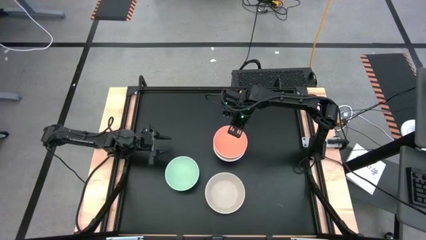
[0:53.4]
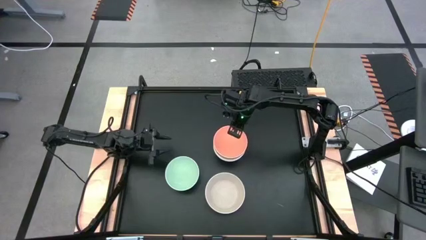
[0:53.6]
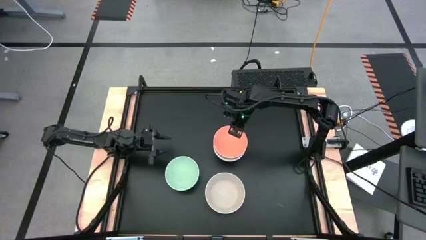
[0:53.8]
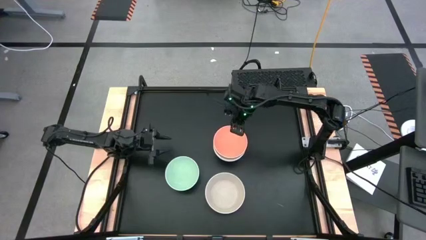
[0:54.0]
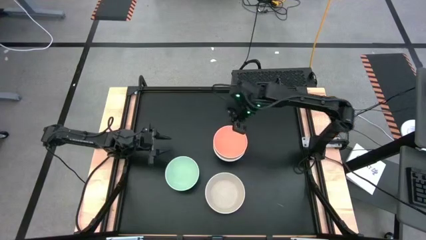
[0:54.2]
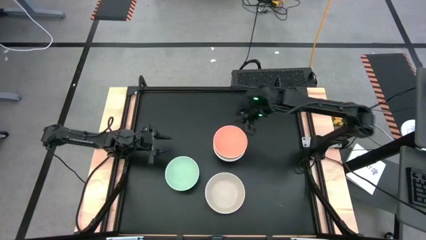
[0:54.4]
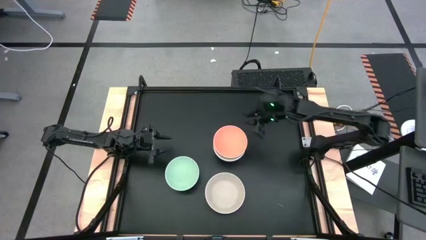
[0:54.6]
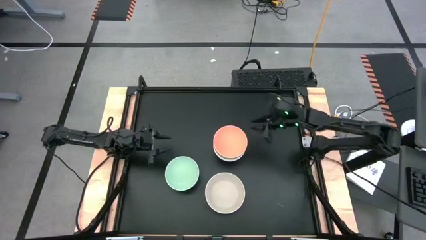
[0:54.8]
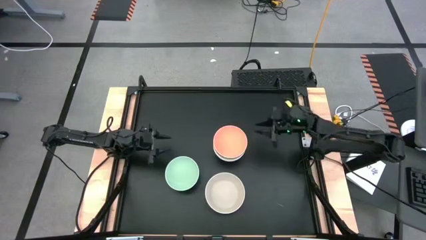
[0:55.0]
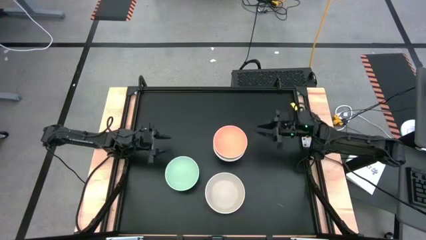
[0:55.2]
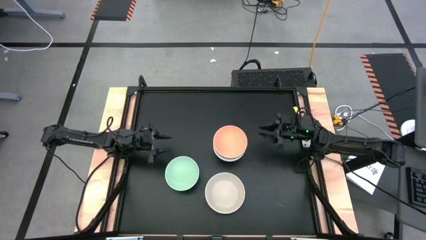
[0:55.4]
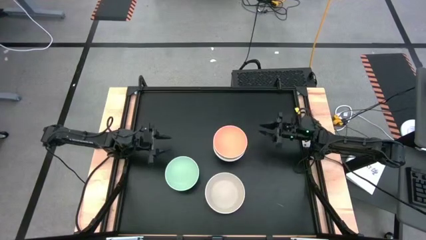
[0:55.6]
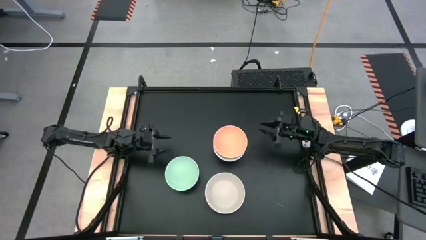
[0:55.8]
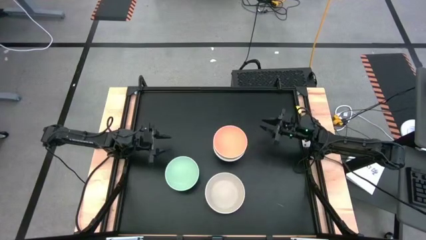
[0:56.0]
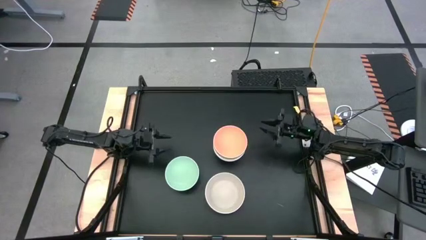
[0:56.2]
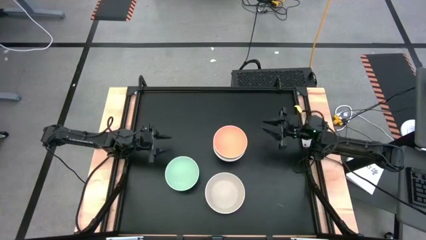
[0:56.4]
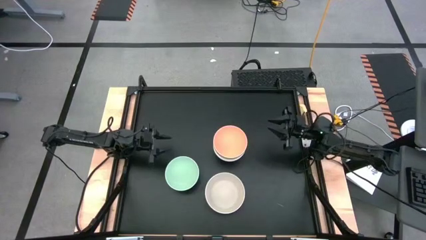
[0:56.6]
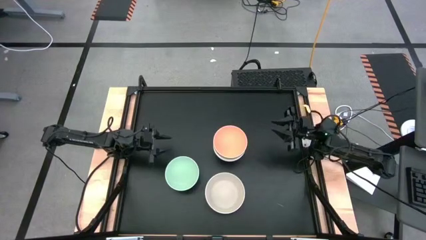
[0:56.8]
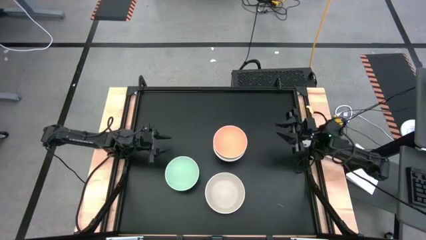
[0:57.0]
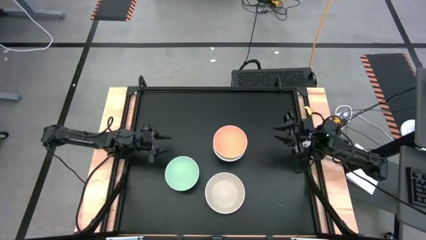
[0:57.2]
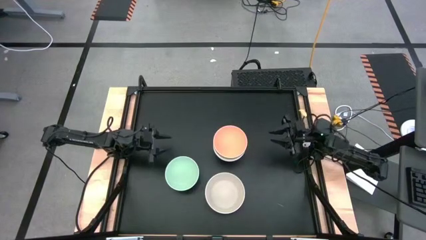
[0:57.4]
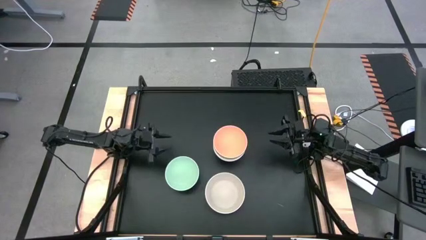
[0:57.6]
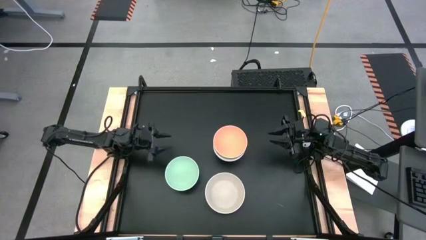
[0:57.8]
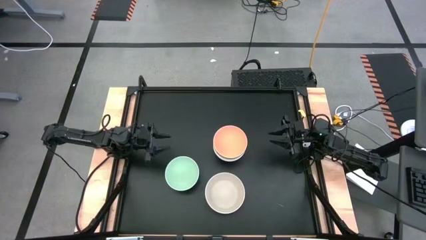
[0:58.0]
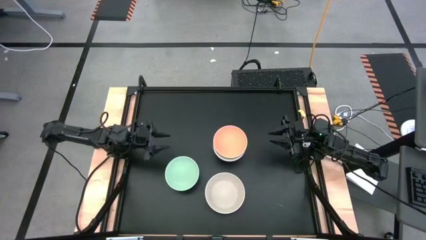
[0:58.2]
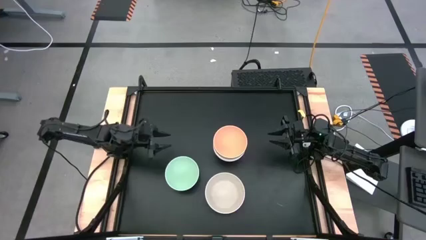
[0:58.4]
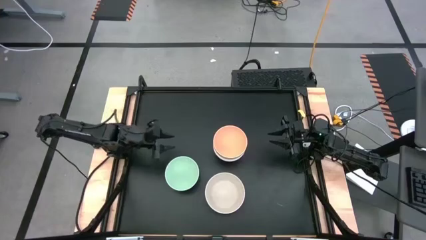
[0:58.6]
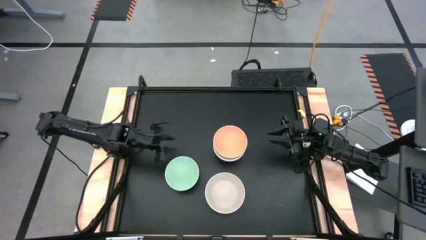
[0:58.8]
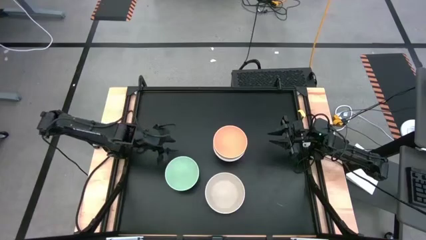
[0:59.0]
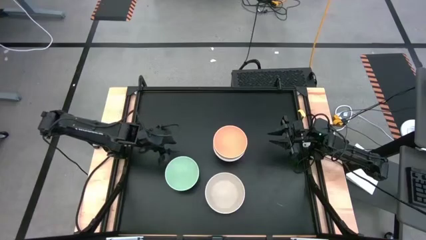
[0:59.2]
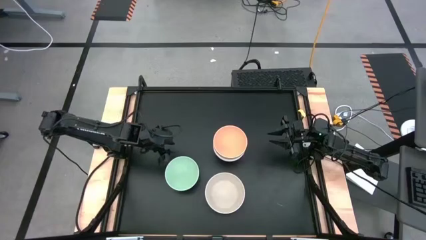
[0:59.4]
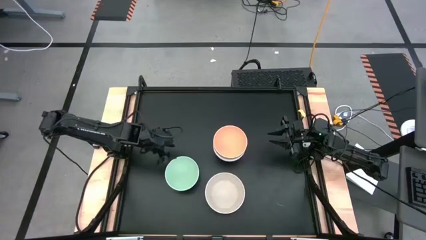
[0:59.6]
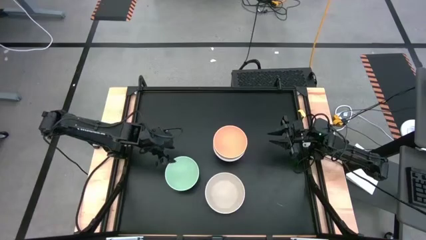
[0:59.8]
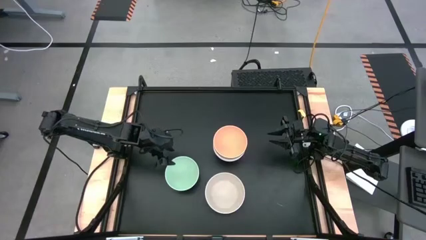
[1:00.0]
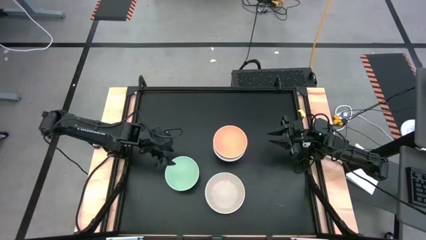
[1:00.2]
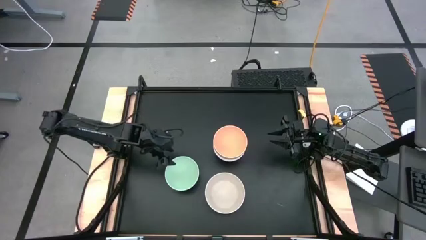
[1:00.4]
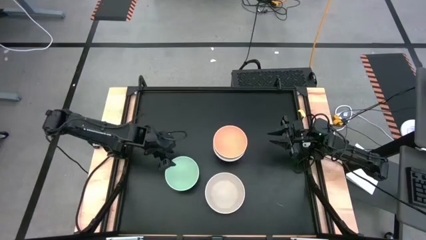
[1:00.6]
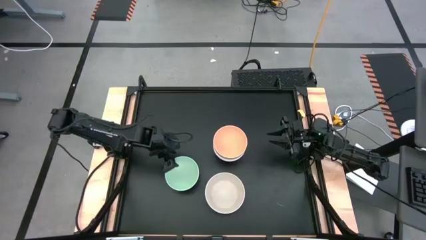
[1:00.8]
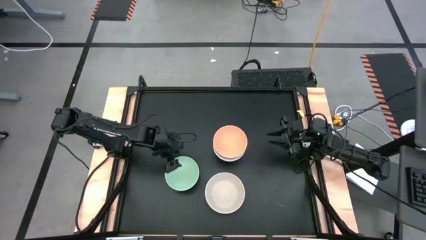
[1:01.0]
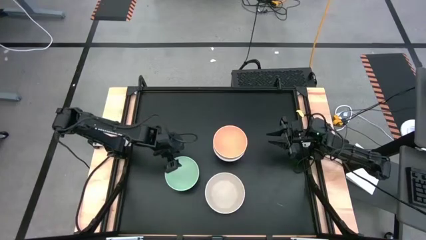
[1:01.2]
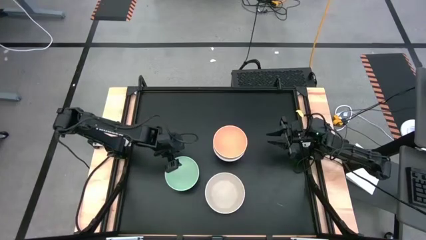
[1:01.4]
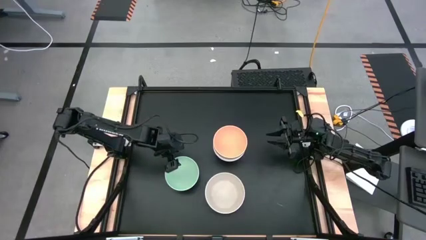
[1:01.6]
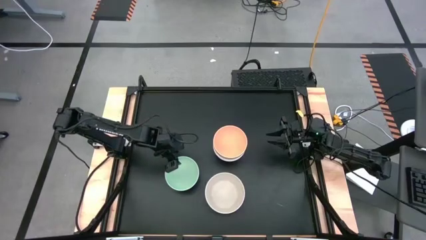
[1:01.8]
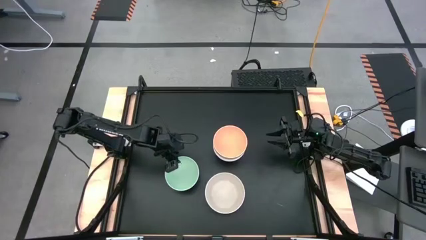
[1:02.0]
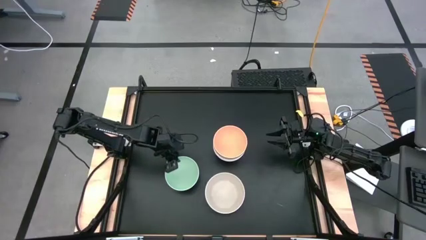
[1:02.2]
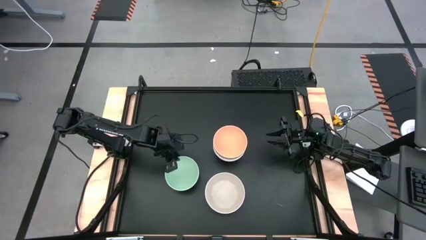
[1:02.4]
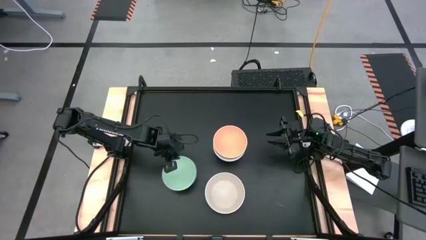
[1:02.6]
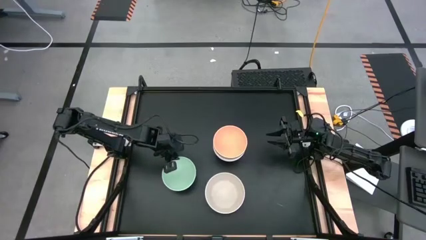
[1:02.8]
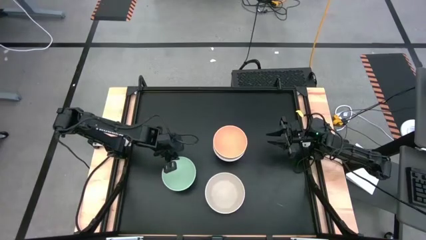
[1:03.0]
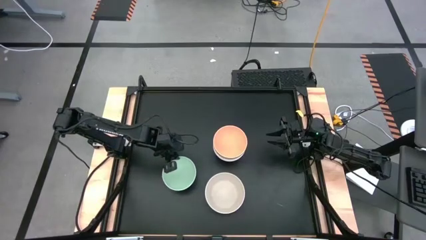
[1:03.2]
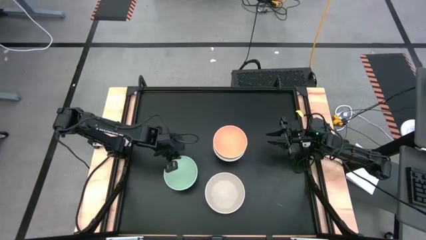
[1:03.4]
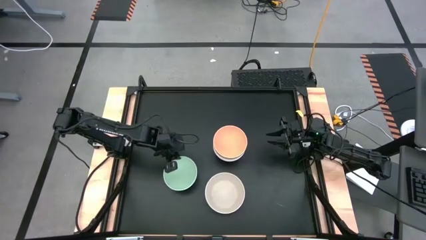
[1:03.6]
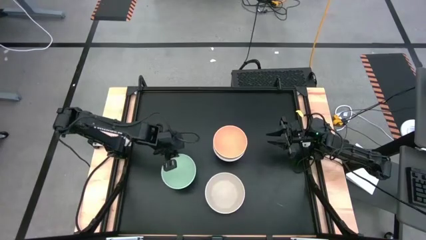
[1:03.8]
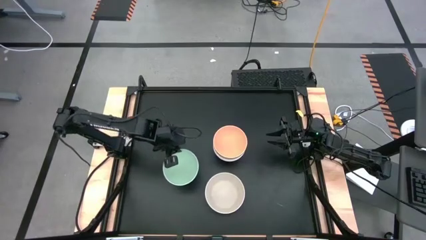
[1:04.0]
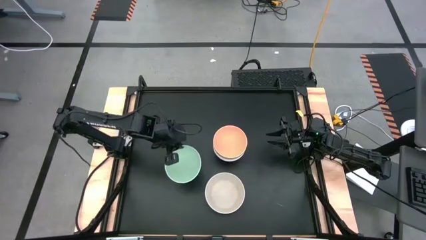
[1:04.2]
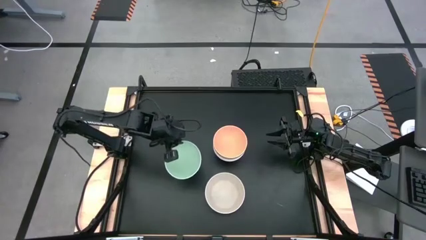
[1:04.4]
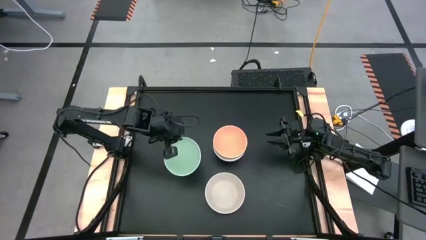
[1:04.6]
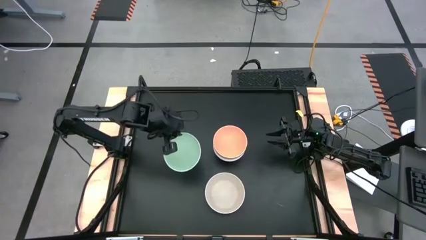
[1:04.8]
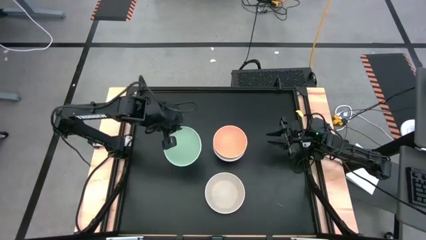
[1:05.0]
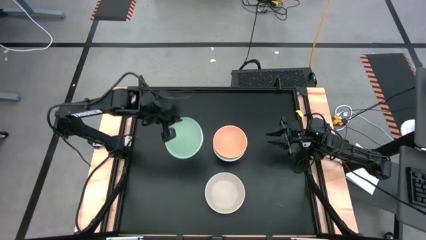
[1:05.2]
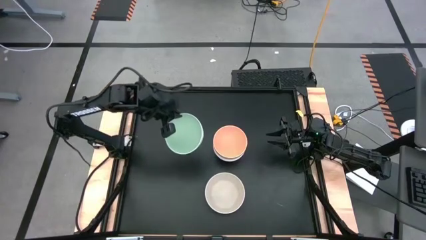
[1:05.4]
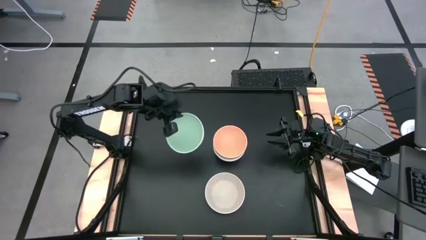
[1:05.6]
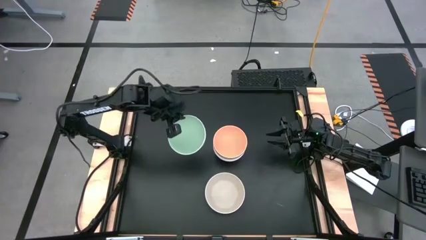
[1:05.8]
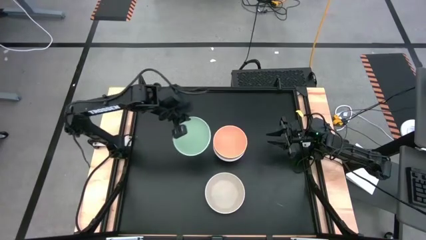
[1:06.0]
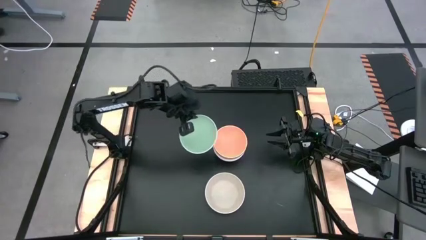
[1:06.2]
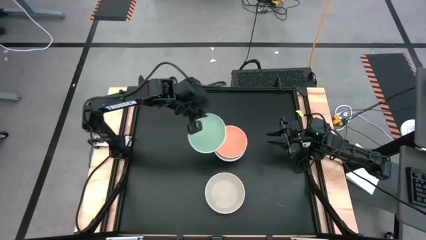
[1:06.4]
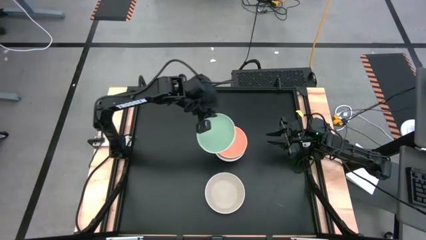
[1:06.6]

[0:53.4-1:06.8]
Task: Nest bowls inside each other
Stack the blue bowl on the stacked orange bowl

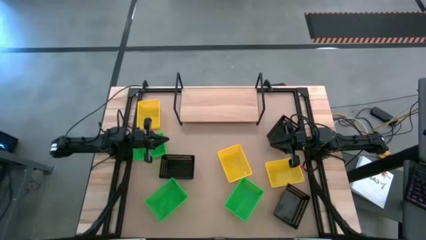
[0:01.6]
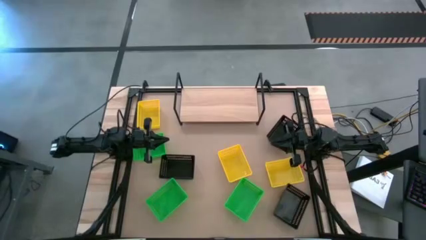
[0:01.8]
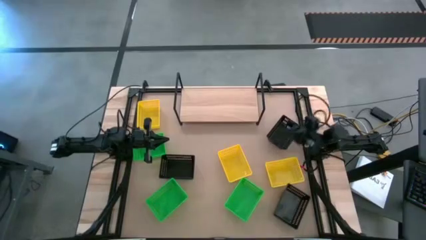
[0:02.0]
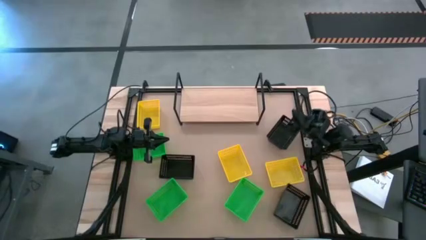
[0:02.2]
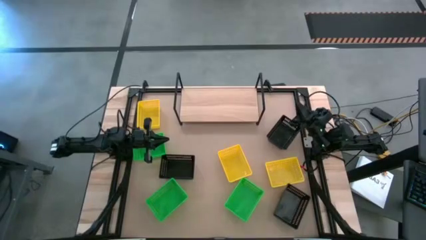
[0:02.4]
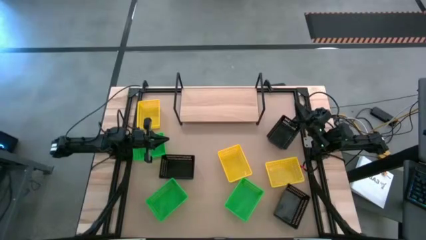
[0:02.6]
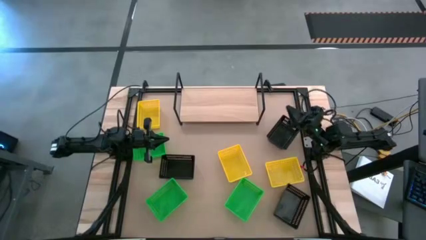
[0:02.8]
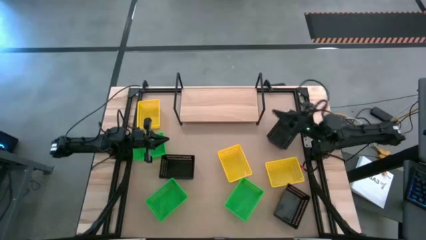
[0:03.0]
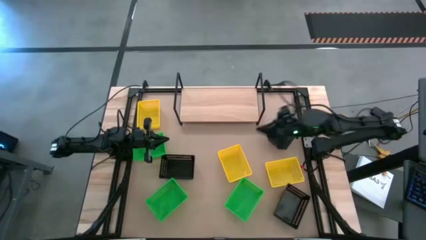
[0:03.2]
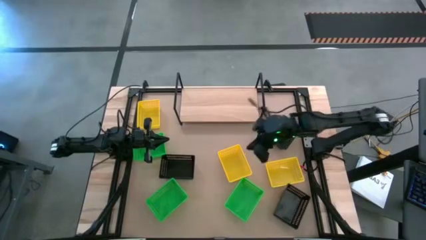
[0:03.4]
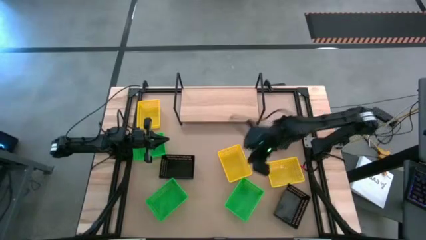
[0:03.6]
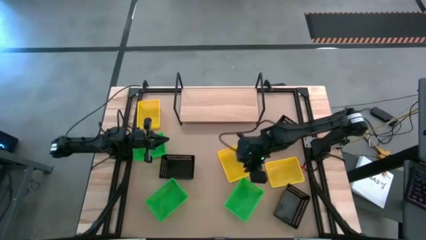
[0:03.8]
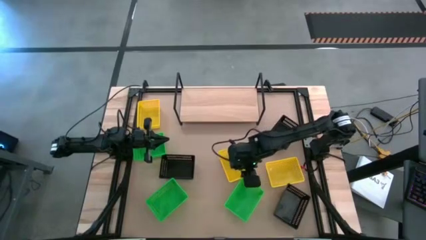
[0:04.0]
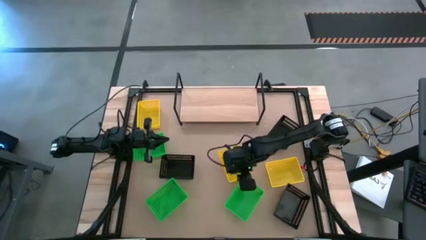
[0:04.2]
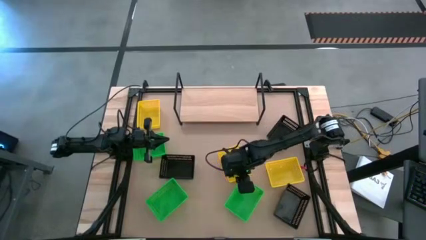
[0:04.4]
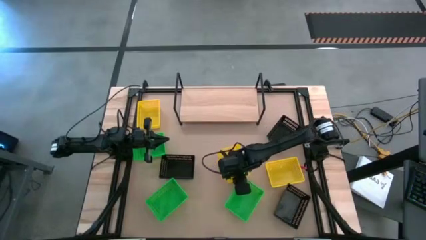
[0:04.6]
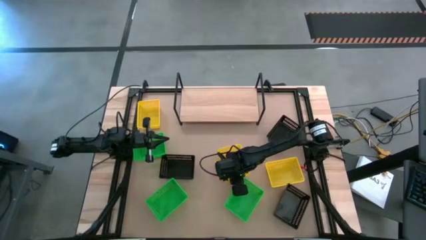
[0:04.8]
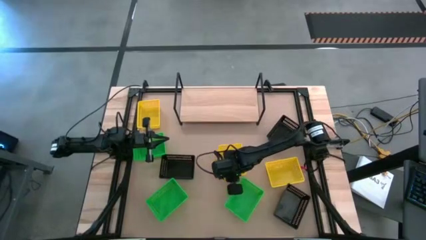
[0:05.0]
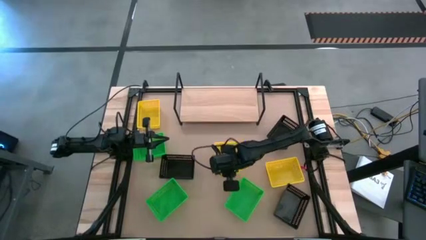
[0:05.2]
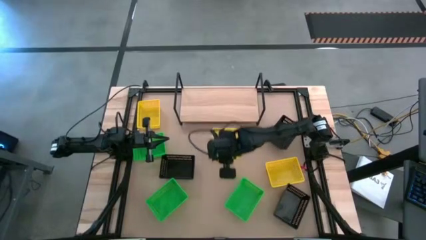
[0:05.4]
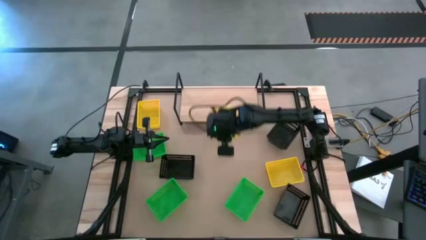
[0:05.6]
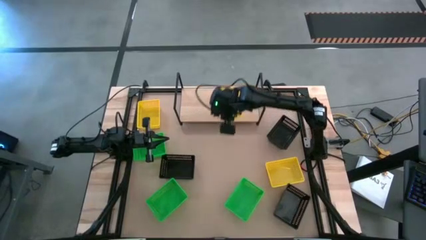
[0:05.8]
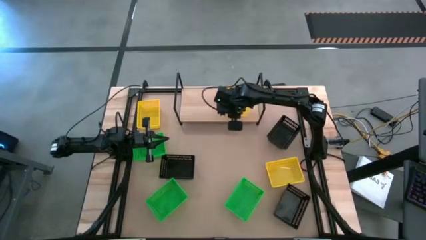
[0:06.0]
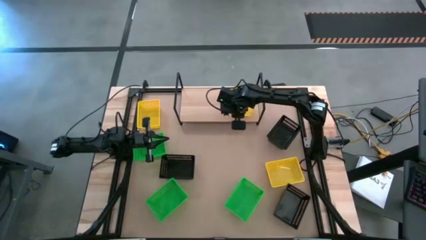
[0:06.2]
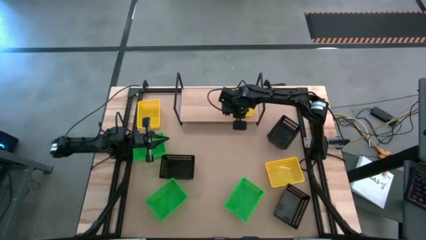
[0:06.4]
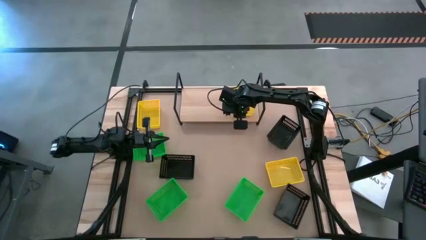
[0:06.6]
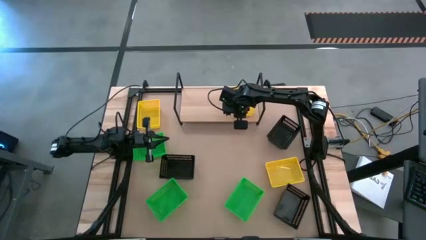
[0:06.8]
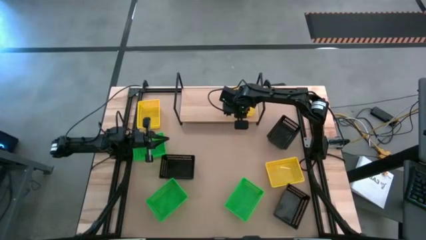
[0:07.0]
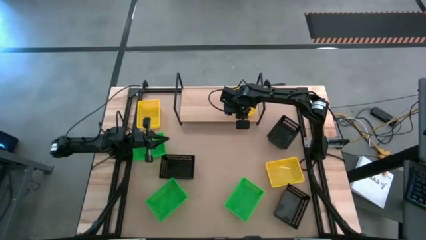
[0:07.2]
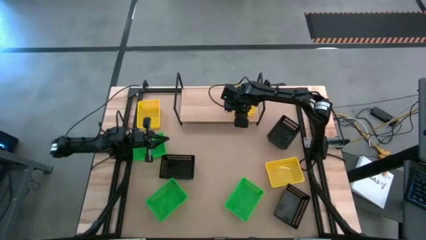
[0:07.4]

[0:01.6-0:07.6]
Task: Stack baskets on shelf by color
Put the middle yellow basket on the shelf
